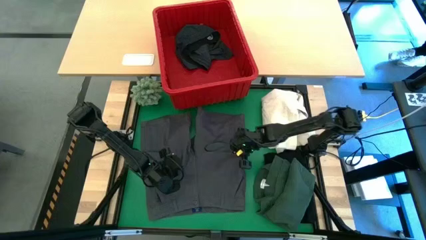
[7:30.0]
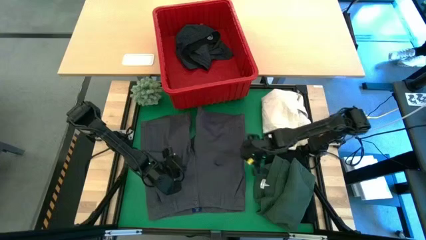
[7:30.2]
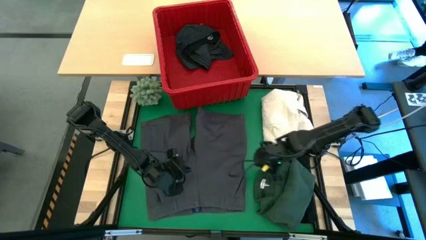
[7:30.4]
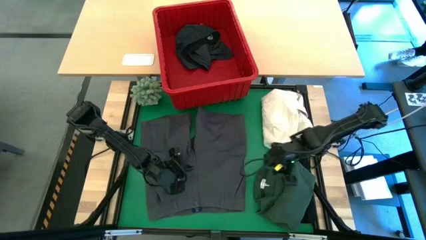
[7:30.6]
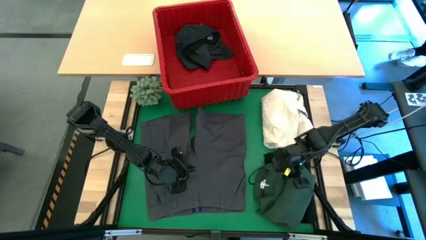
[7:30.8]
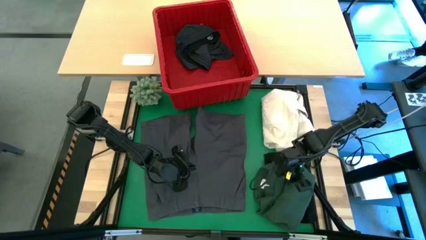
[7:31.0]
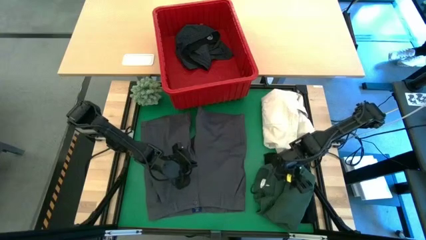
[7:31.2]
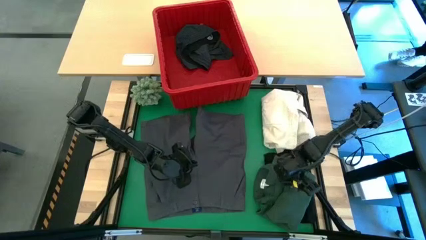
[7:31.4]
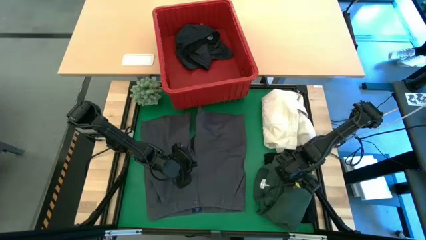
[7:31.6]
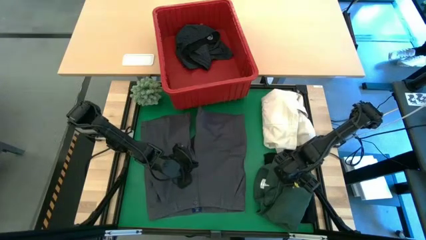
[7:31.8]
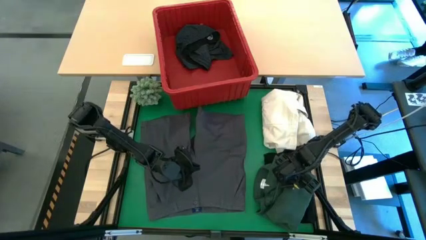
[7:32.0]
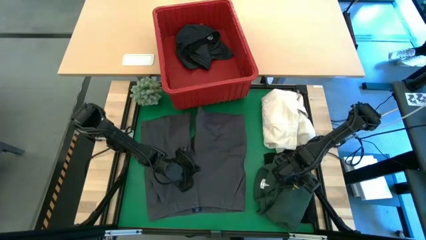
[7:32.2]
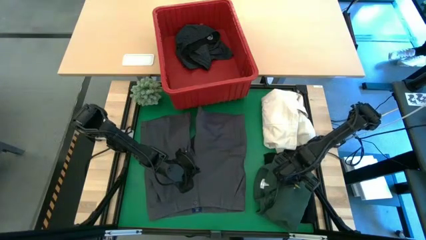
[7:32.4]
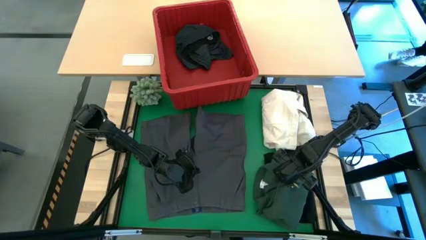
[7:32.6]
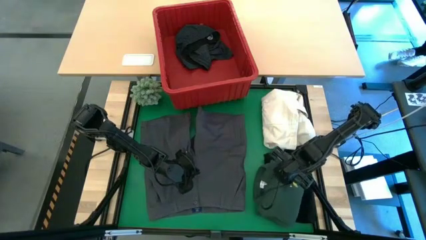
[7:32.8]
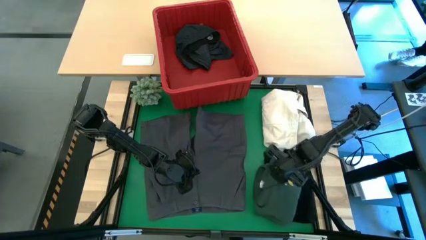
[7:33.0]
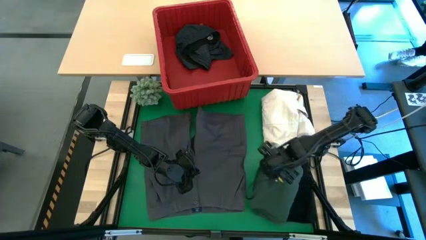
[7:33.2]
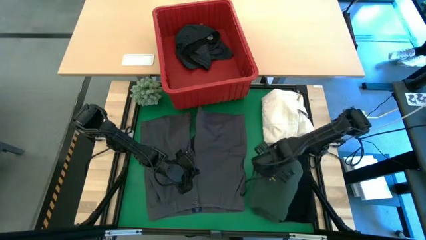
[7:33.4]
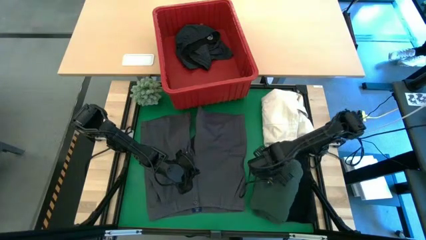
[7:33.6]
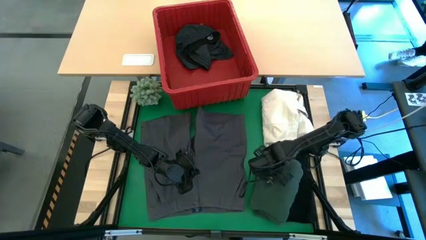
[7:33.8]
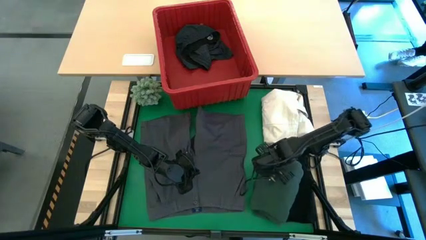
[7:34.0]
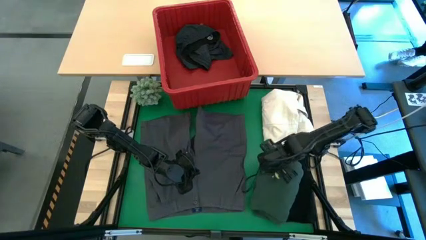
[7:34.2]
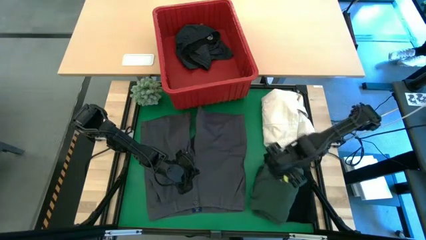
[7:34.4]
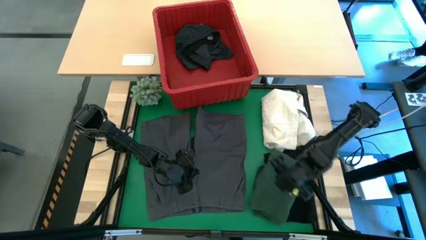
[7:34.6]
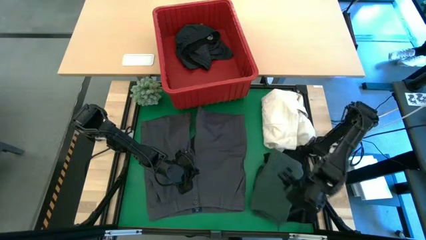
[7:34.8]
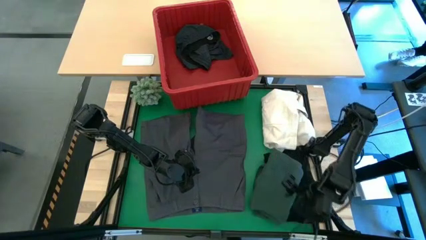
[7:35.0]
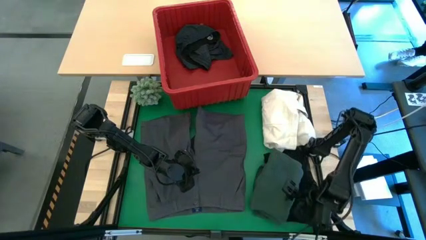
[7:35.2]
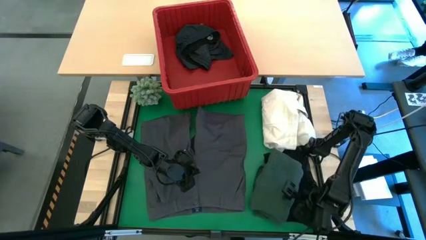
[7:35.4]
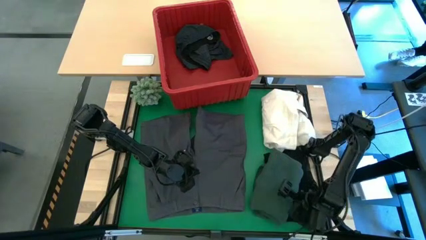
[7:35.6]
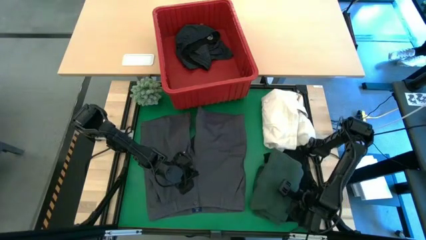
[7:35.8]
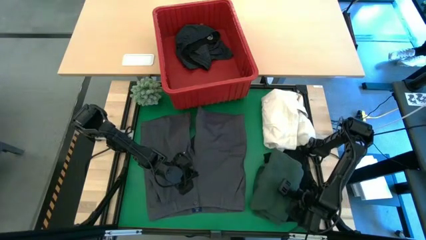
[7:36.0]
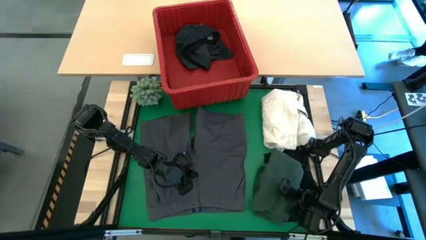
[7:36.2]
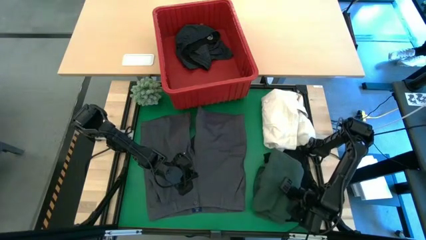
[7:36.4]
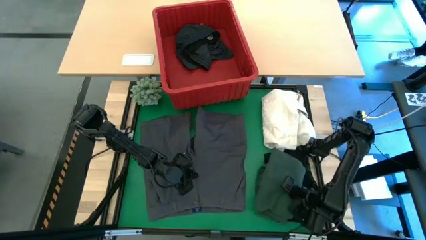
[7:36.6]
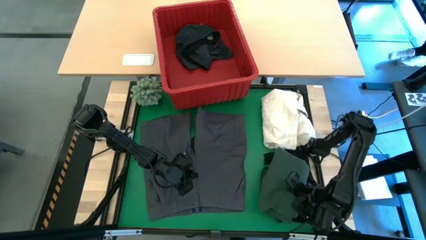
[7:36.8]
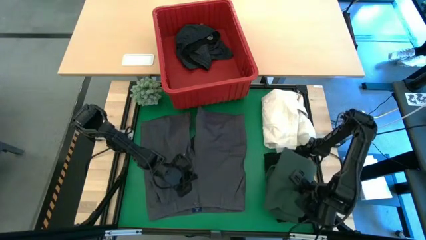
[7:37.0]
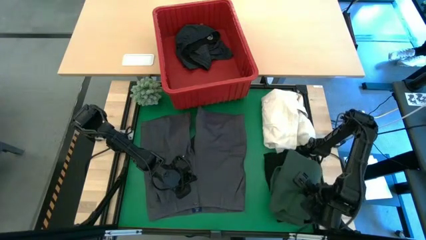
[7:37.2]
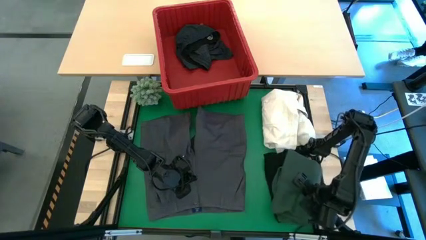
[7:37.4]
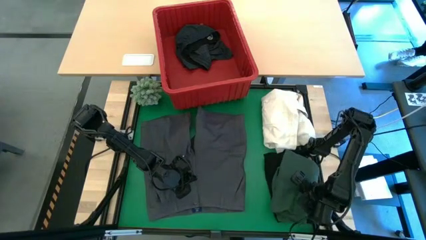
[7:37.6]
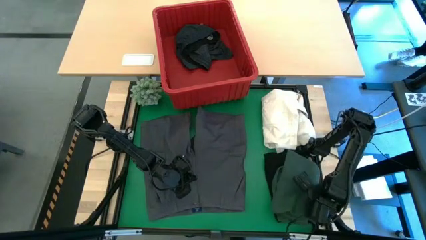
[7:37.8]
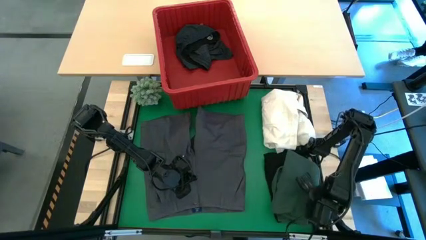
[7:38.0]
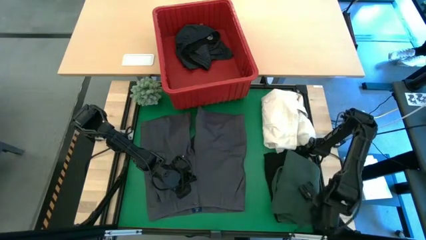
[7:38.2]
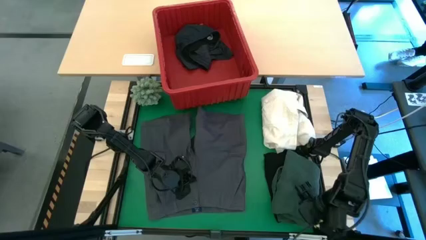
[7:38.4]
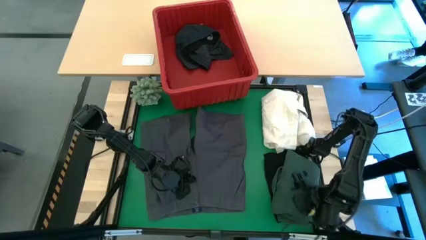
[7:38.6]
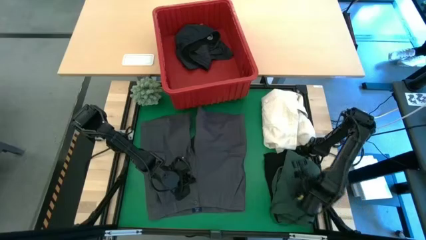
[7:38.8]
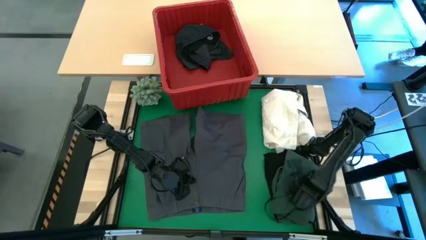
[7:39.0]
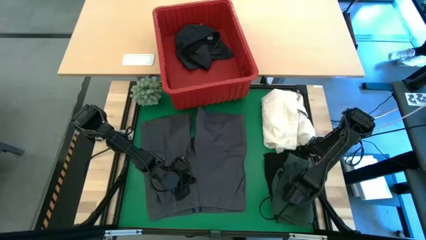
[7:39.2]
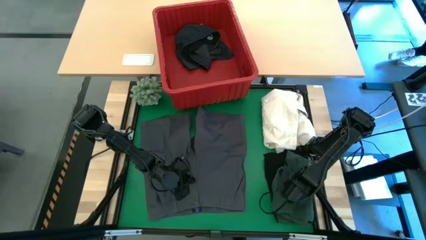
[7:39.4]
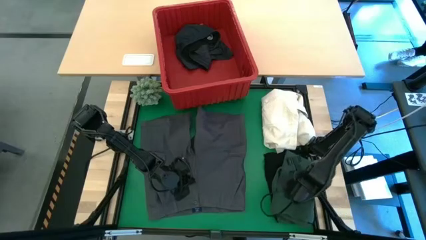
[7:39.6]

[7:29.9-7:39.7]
Task: Fold laundry
Adjust the green folded polo shirt

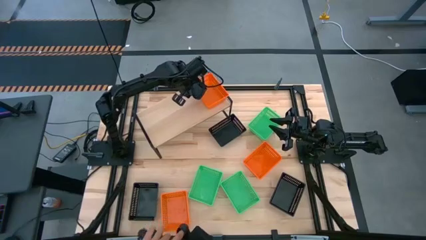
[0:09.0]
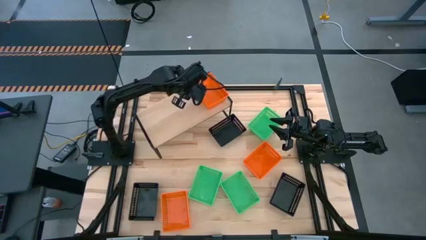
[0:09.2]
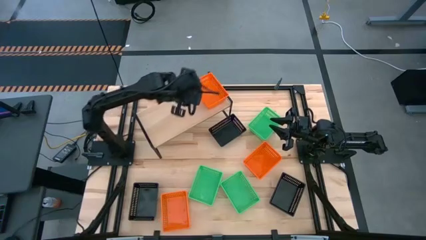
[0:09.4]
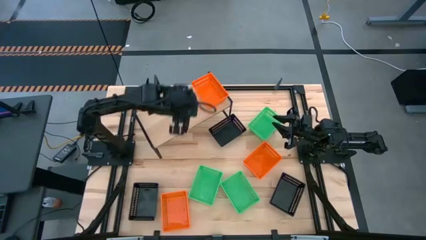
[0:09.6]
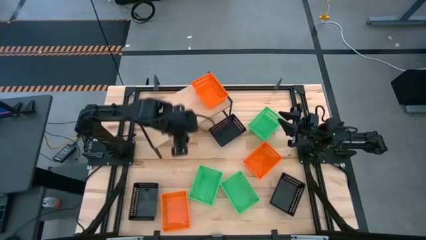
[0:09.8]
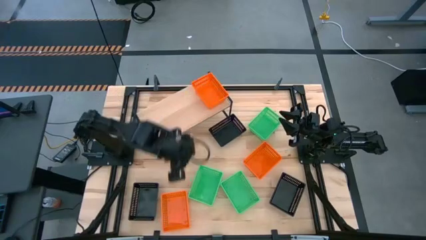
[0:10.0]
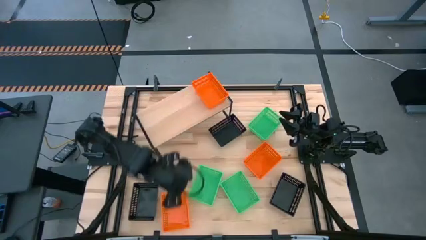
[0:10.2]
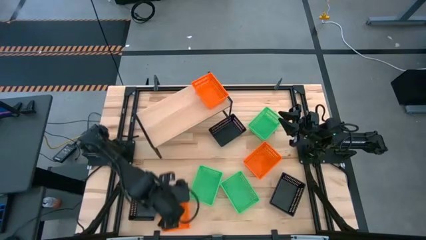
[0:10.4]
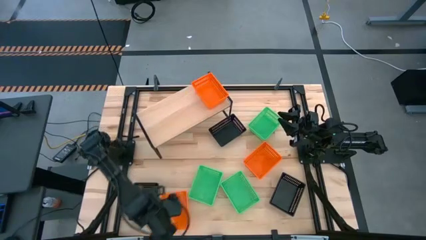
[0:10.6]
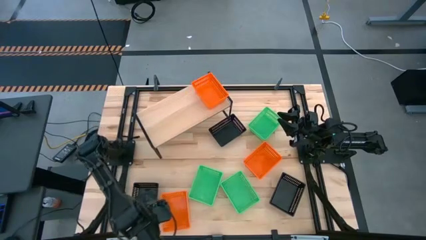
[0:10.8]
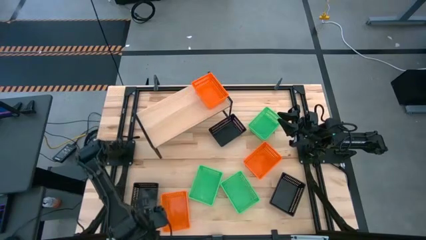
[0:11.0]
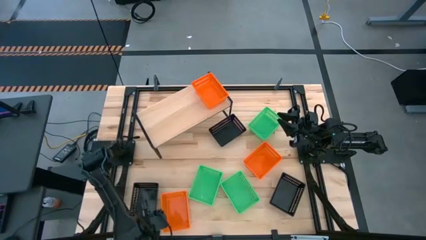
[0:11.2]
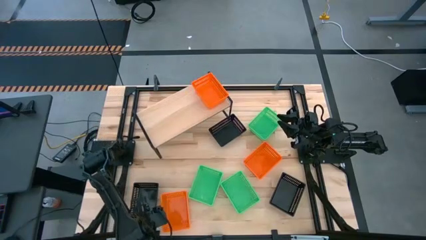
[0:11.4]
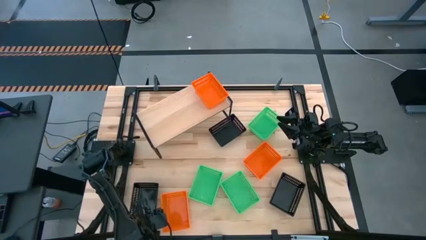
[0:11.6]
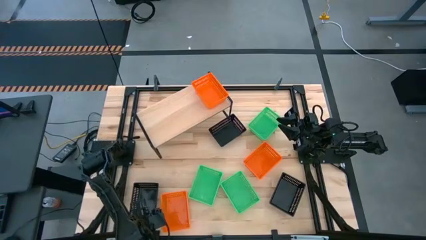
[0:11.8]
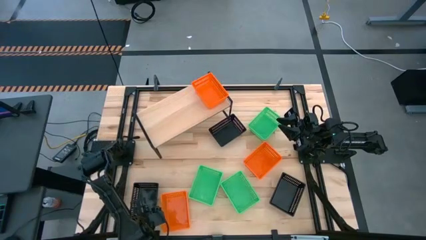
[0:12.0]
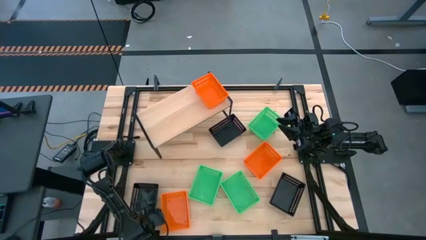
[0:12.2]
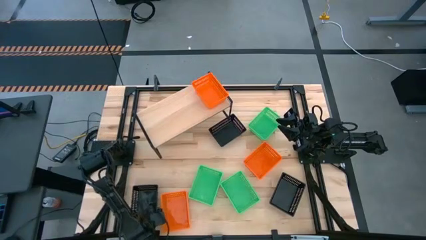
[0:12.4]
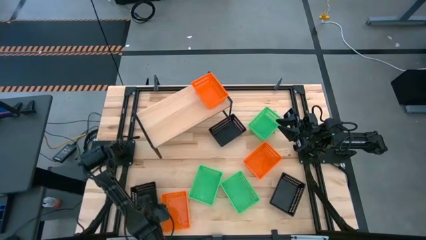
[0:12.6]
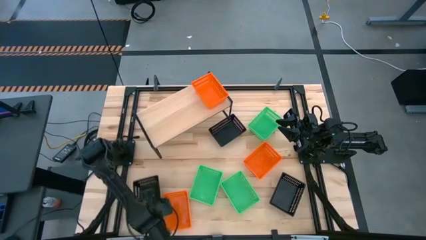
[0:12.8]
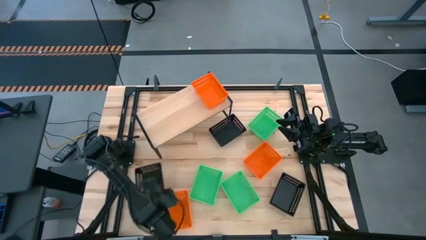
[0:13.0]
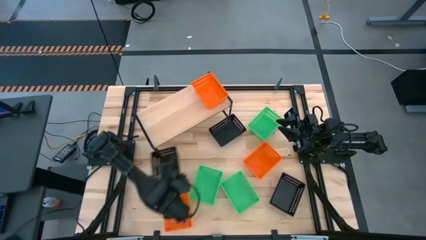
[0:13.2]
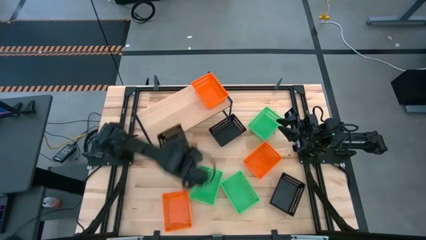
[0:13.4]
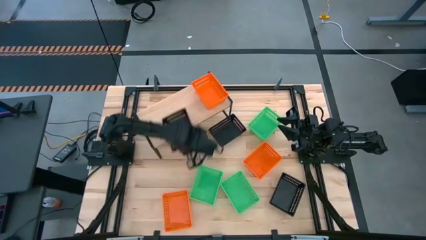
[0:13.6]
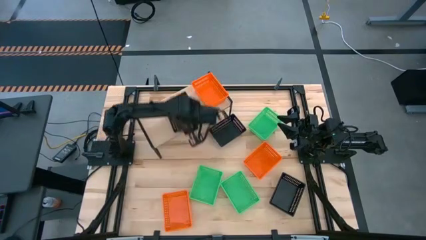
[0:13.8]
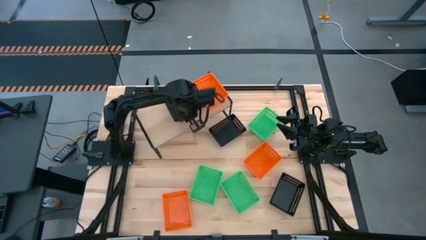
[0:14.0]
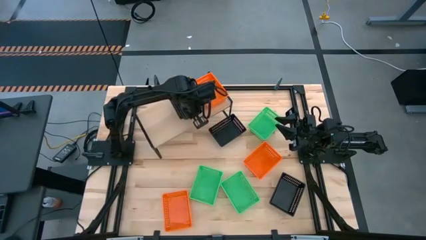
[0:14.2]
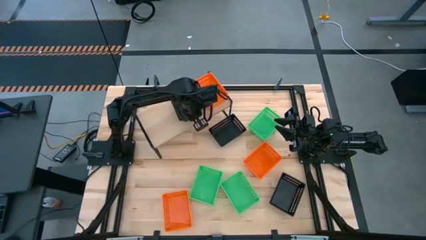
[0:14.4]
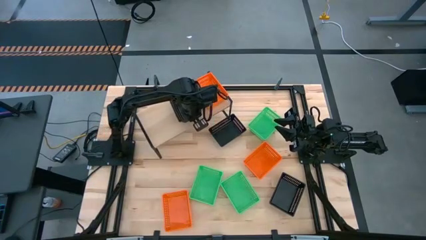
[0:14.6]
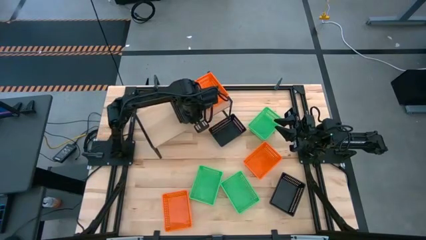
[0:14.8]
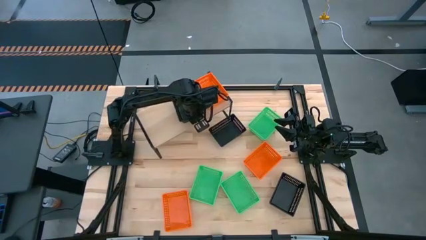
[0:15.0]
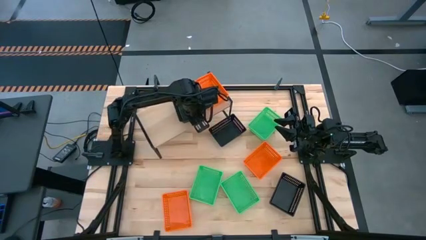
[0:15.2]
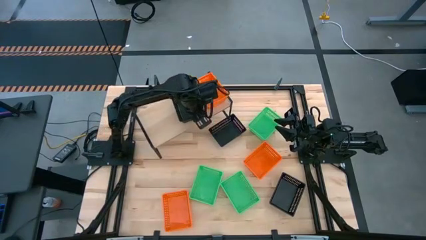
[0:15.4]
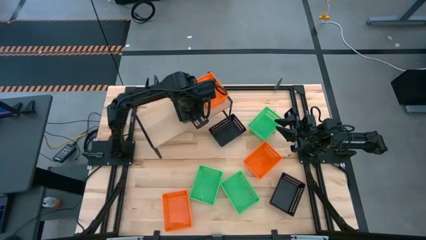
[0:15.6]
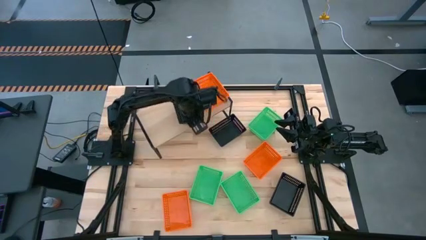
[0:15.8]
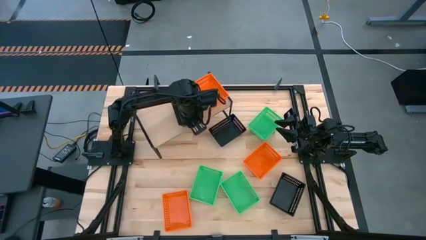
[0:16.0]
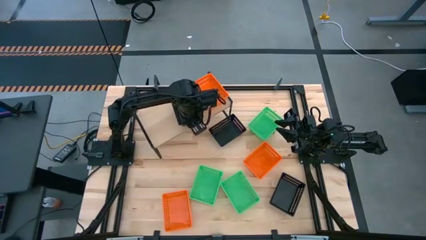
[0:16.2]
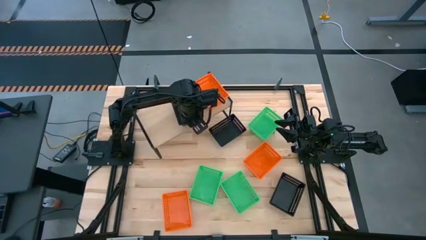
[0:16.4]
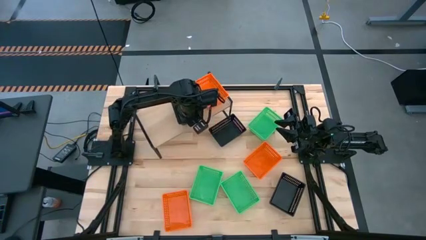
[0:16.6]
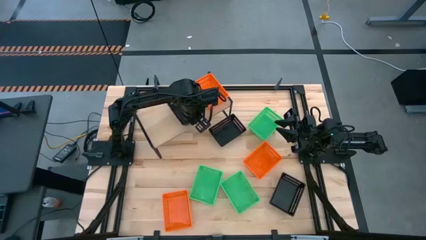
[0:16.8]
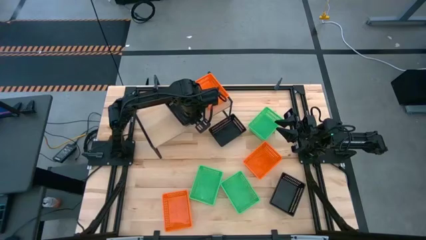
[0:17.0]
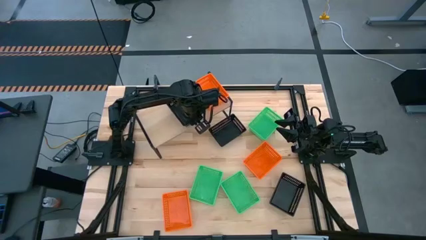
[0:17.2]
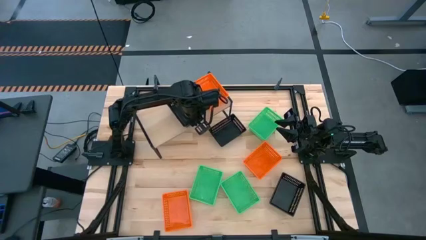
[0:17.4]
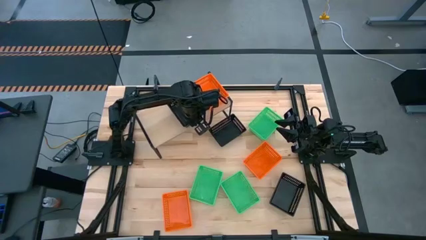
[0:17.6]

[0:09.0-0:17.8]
Task: Stack baskets on shelf by color
Put the bottom left black basket on the shelf
